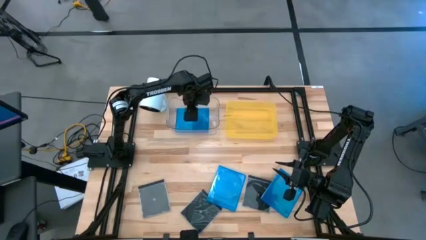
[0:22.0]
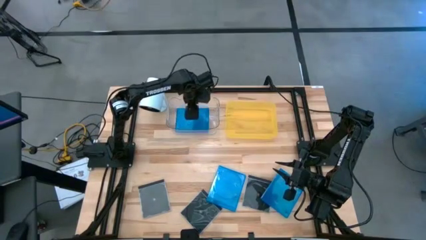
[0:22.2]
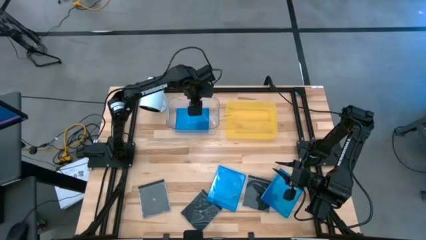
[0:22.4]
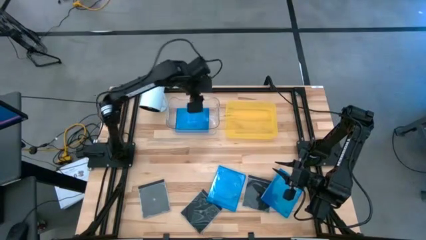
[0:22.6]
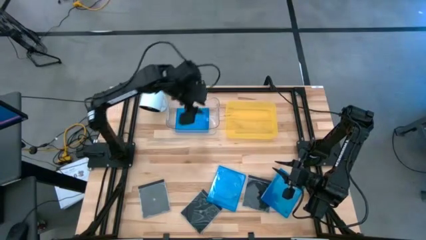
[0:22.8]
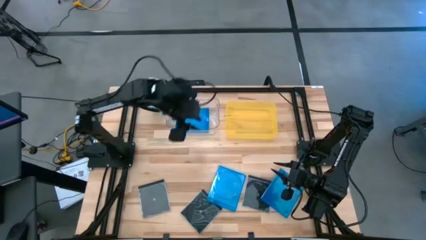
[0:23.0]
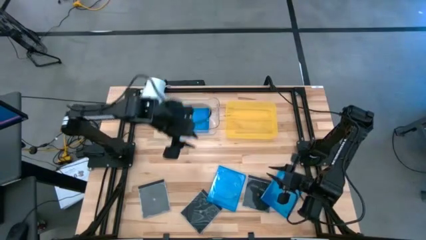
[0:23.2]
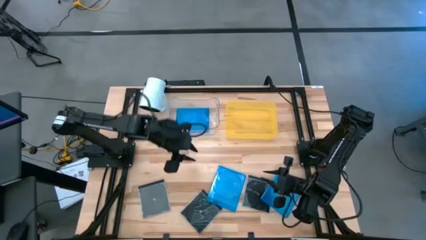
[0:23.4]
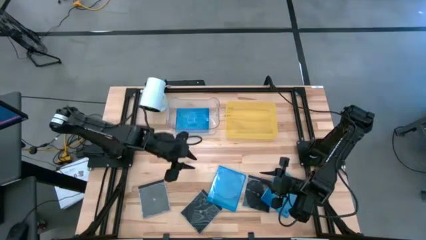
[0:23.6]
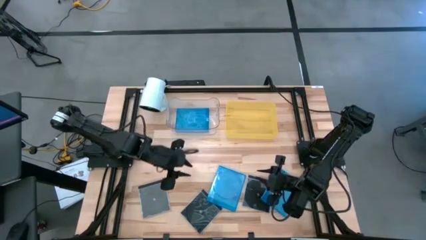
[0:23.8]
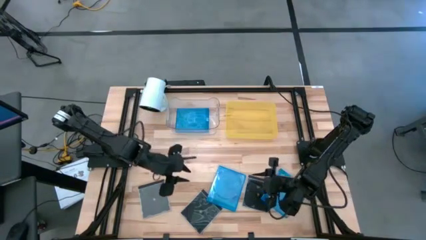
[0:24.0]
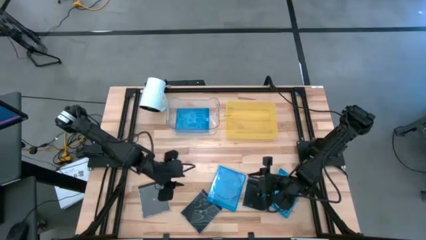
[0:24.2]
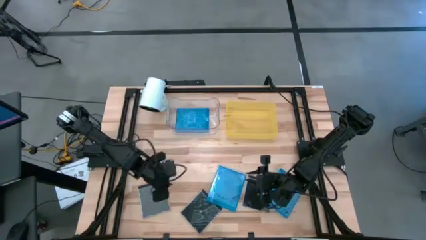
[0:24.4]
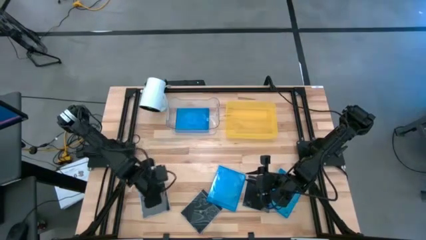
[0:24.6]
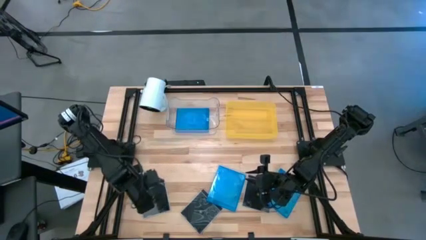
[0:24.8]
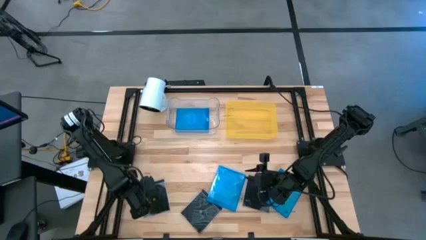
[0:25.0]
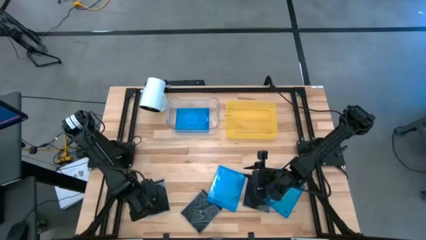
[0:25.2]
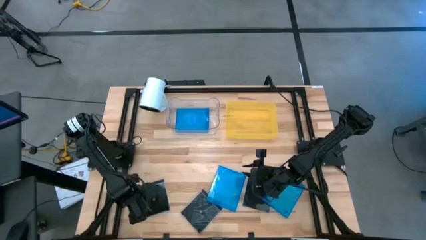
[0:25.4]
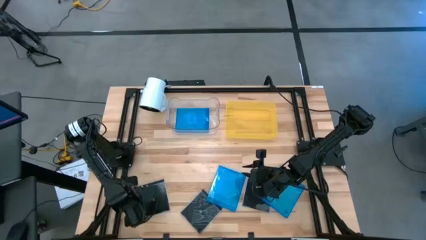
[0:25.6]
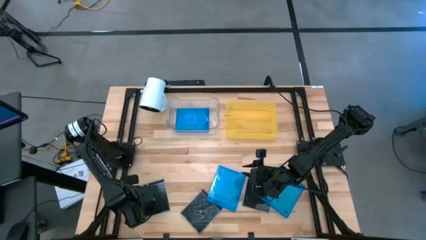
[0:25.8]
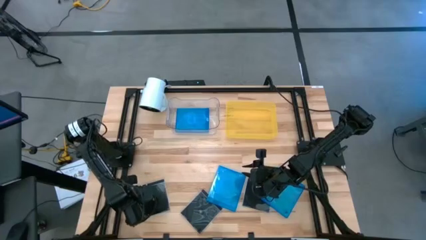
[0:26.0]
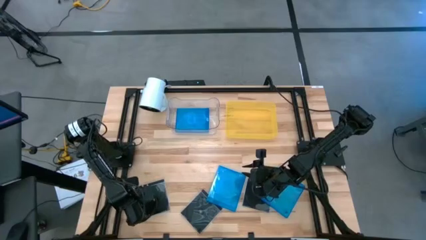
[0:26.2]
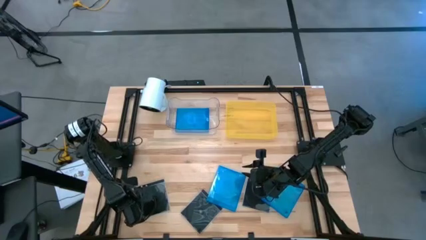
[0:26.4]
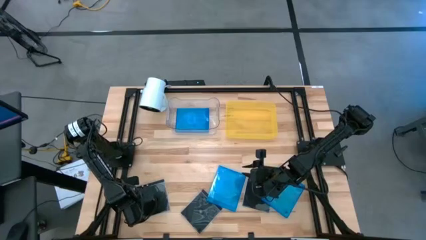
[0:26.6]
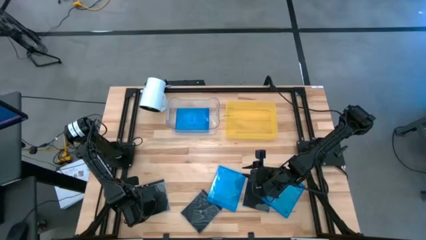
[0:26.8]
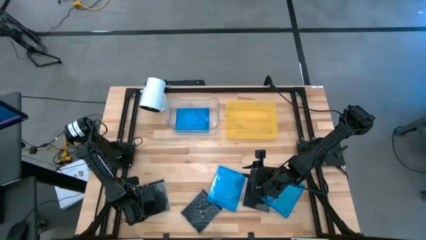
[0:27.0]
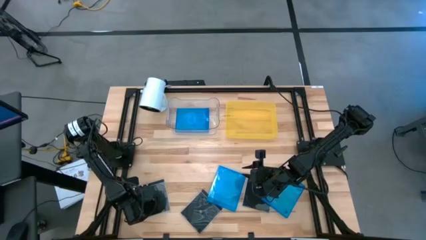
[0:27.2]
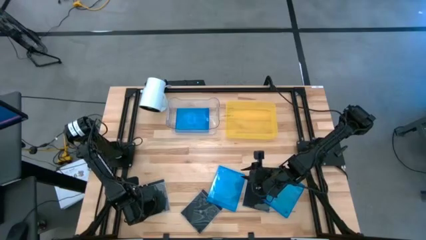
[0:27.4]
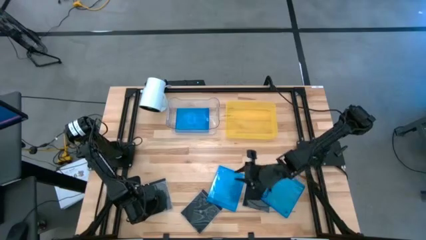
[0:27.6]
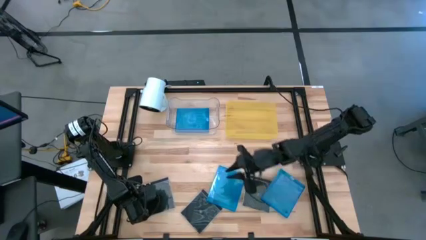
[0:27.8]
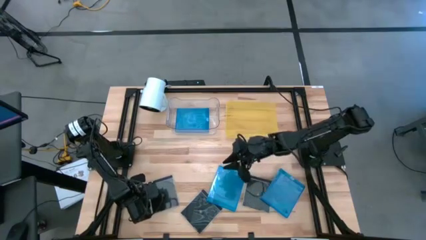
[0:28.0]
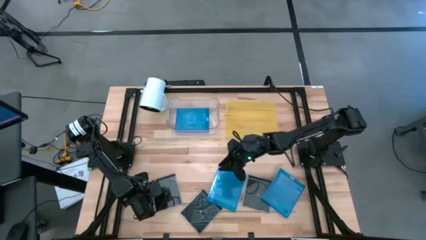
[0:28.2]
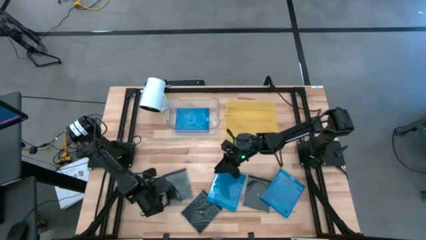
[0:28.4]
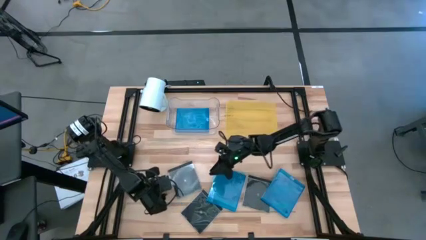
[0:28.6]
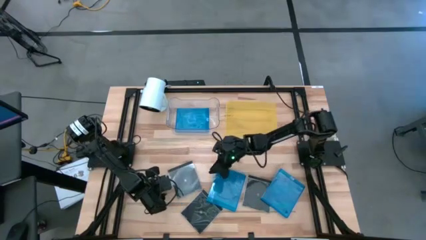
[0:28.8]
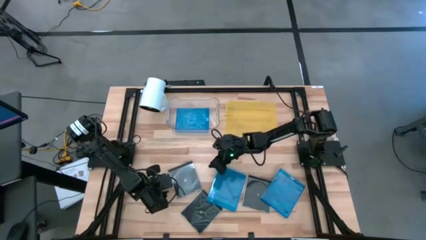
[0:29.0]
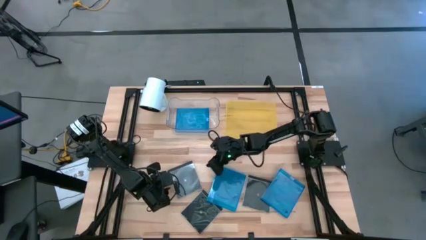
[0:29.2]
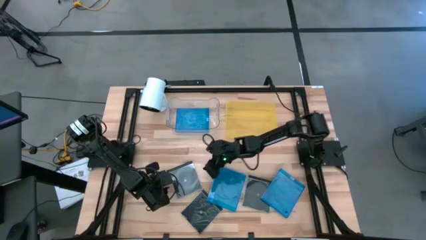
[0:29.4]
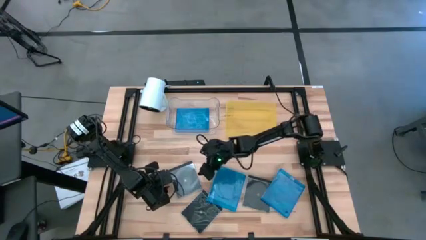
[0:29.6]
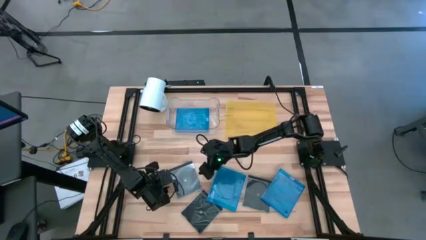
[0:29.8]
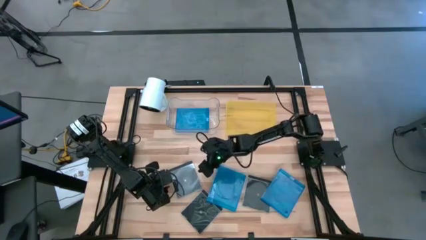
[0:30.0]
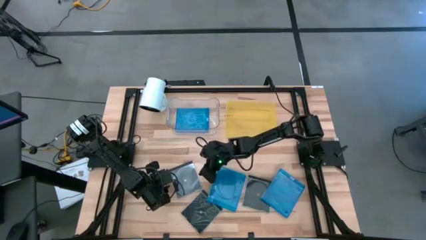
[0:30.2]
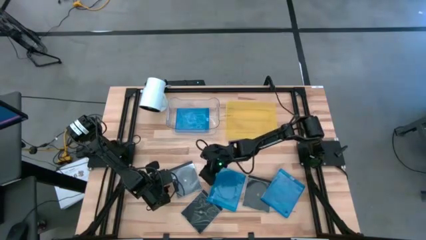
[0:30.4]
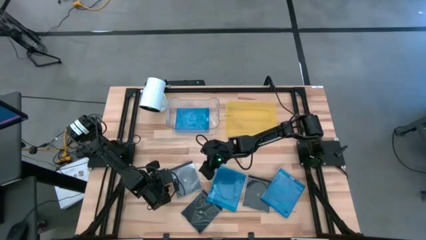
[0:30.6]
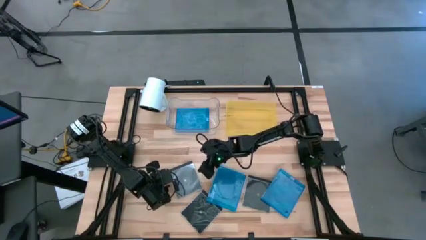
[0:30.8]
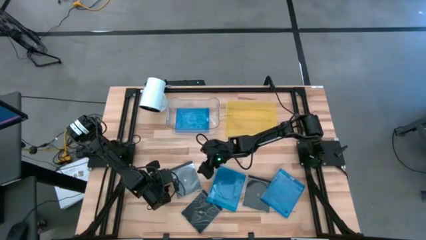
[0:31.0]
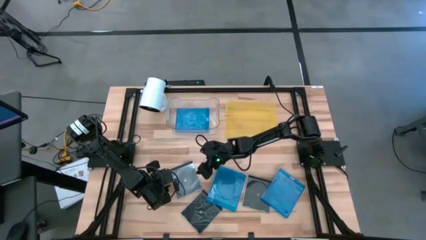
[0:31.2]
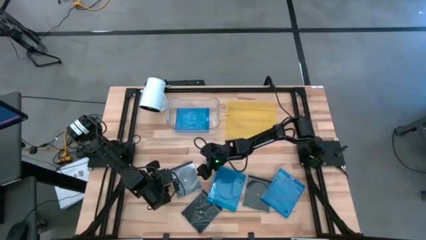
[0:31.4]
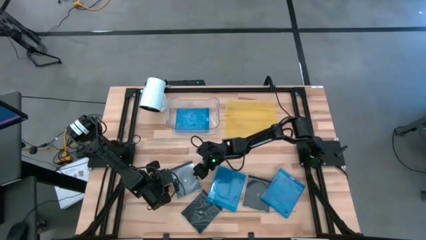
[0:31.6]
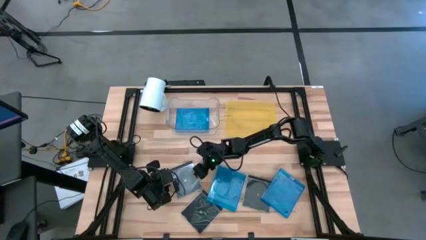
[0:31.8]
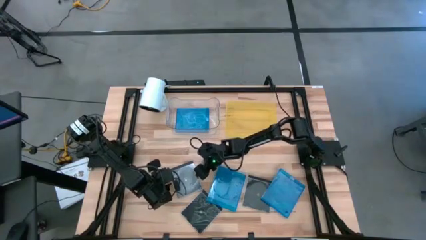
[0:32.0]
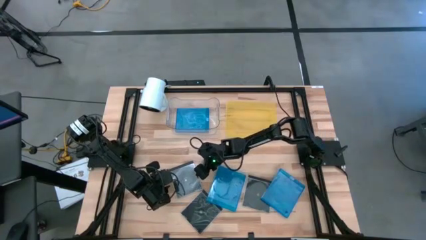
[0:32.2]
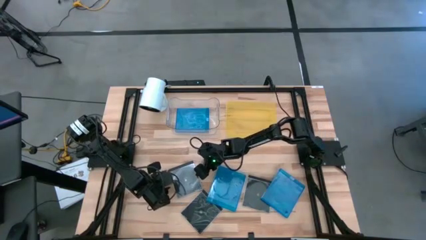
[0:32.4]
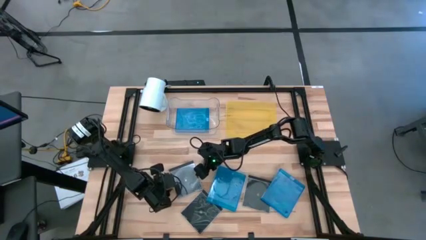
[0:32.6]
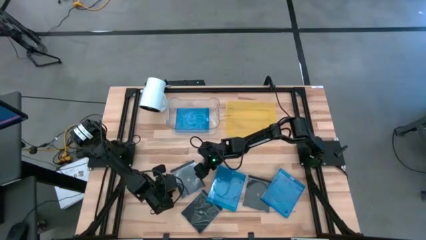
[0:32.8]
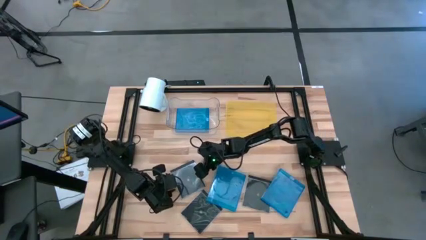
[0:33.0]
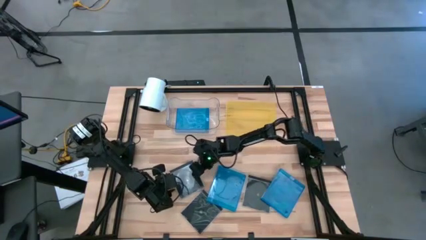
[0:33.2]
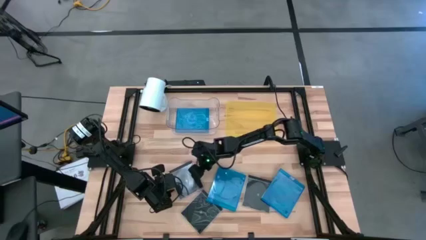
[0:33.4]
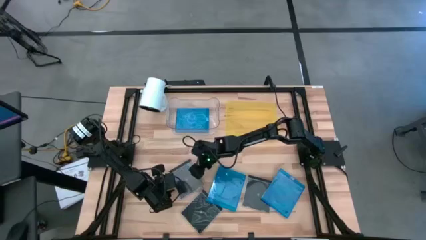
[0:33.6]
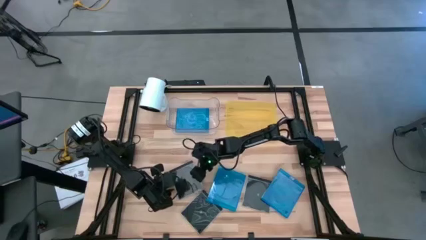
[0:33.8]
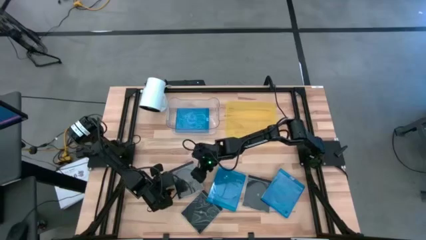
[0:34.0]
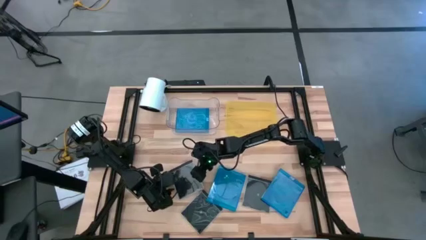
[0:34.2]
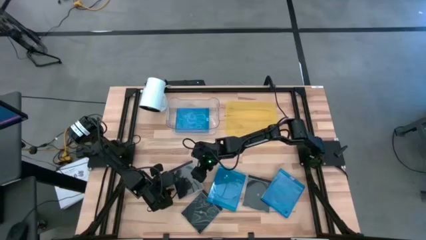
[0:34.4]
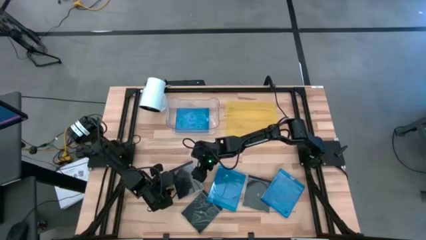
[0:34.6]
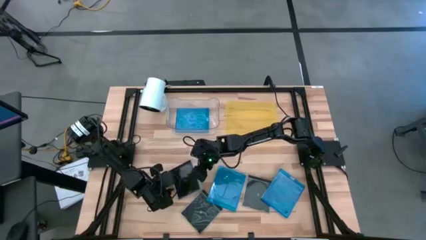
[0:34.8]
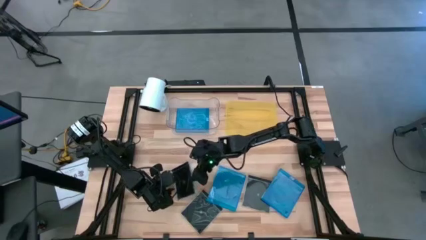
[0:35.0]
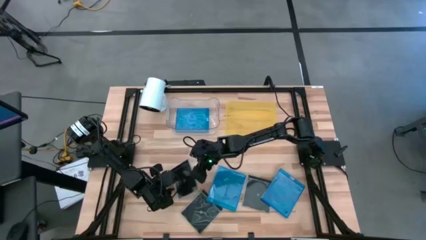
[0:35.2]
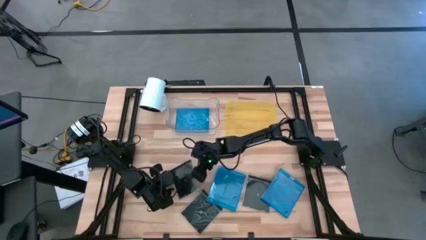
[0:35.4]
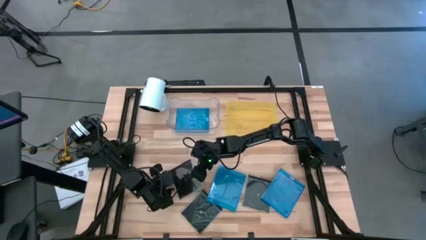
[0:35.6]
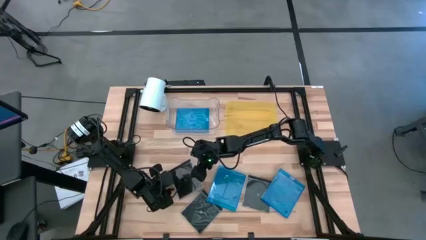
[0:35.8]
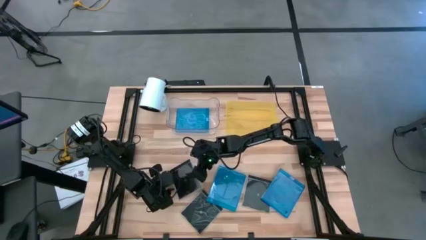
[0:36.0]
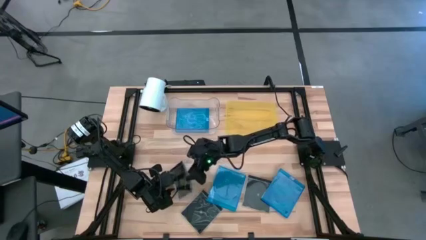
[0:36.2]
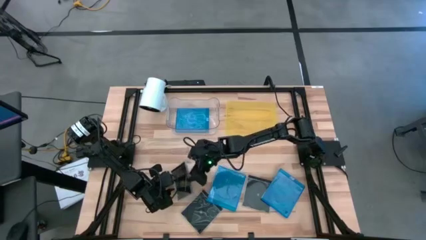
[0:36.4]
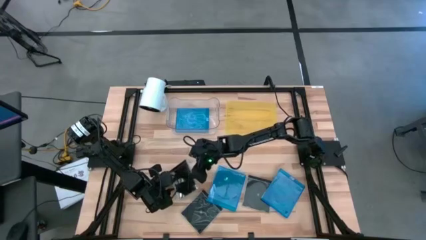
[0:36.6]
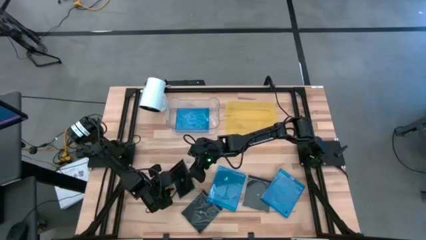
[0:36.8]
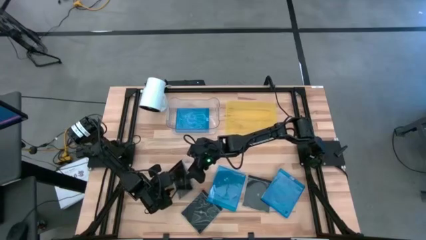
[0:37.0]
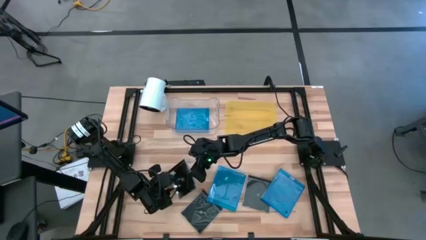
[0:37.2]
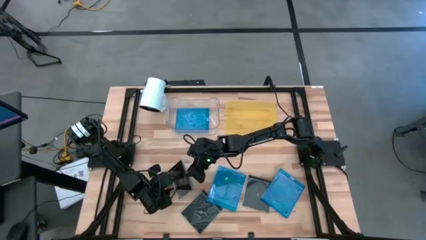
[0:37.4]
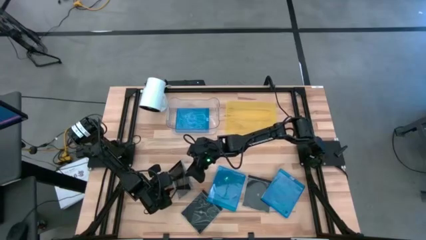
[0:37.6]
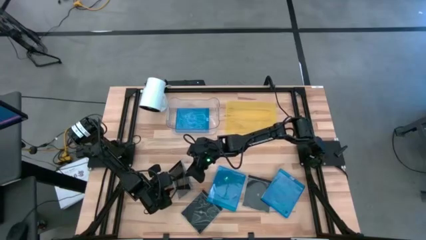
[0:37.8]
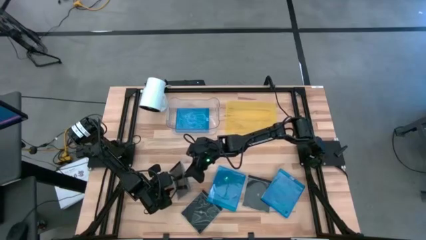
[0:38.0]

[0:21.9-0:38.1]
Task: Pick & place jewel cases by type
Put the left black CD case into the yellow bin
